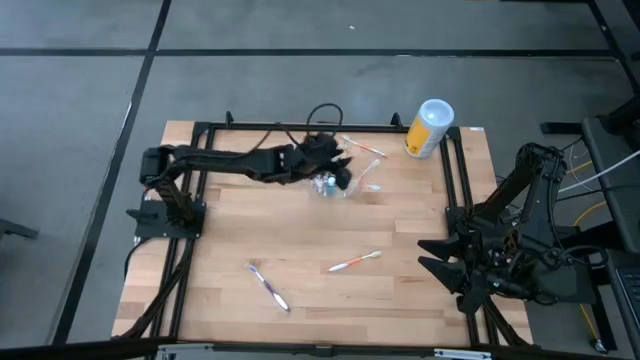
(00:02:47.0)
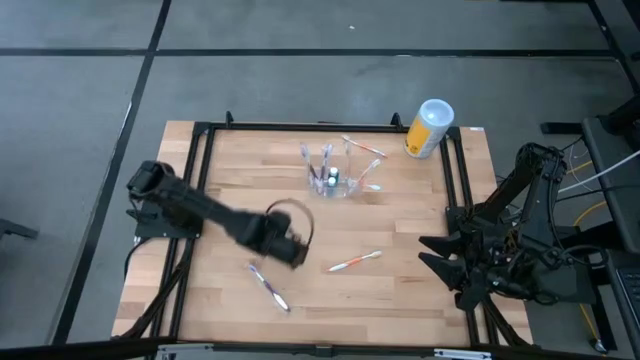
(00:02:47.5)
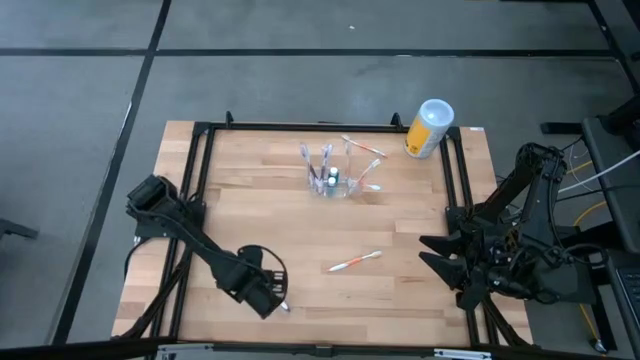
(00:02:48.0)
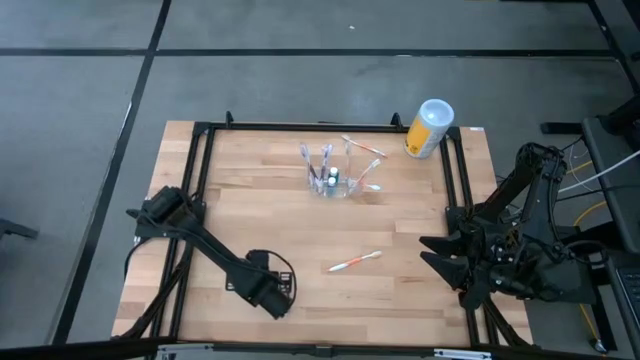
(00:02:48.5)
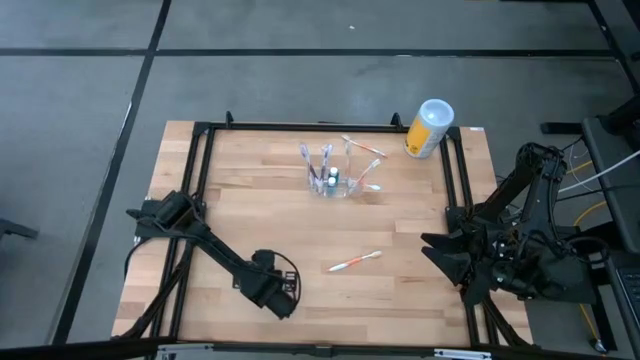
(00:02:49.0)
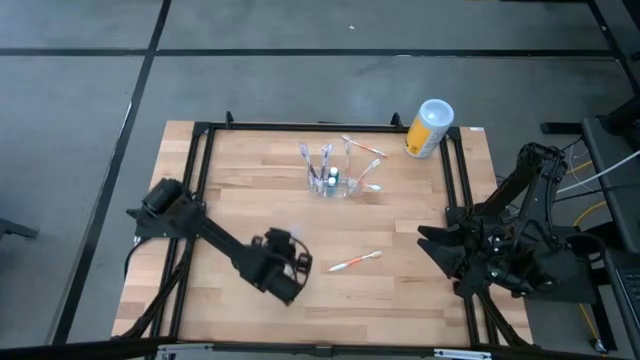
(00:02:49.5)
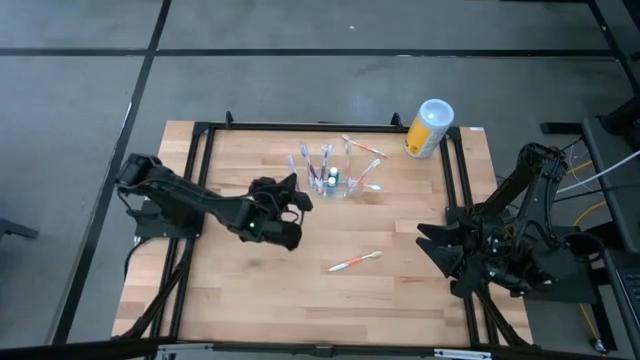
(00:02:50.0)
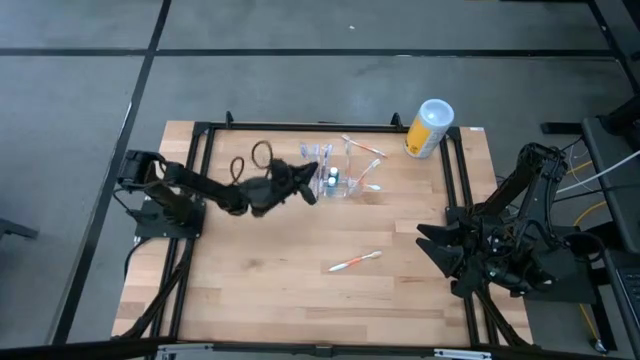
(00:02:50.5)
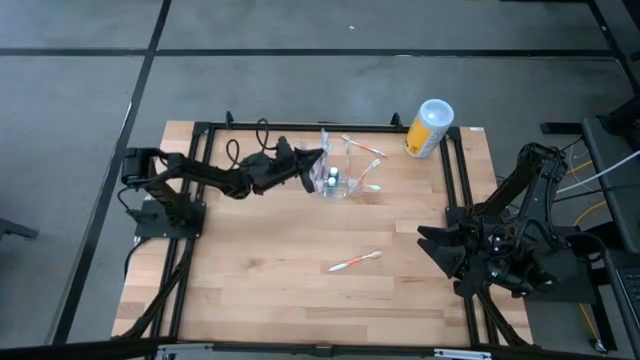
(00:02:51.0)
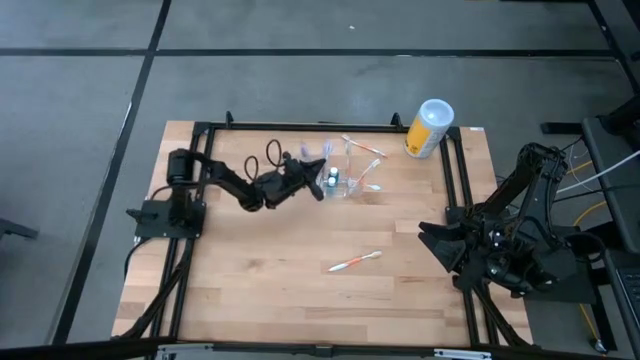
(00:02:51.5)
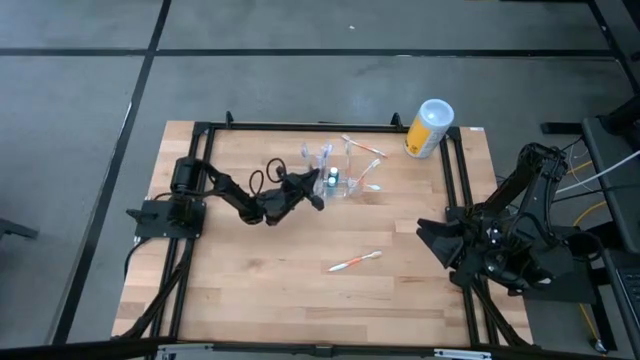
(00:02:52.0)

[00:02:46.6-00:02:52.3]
Task: Pick & Place toothbrushing station
Put the purple toothbrush into the left section of the transparent organizer

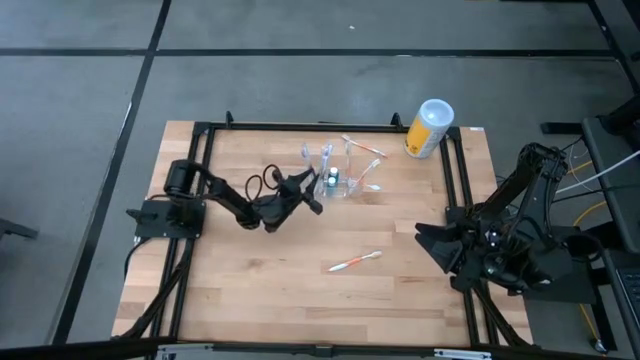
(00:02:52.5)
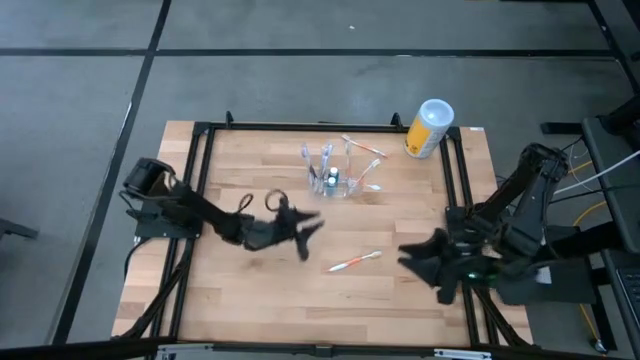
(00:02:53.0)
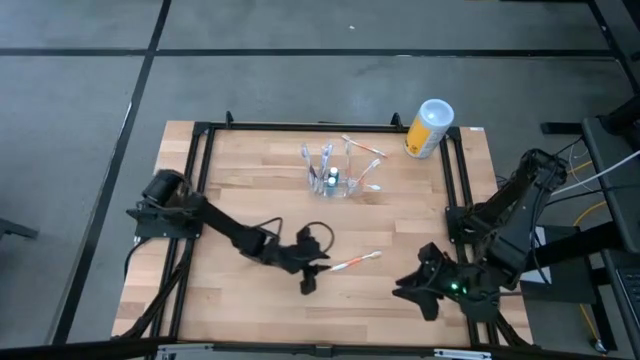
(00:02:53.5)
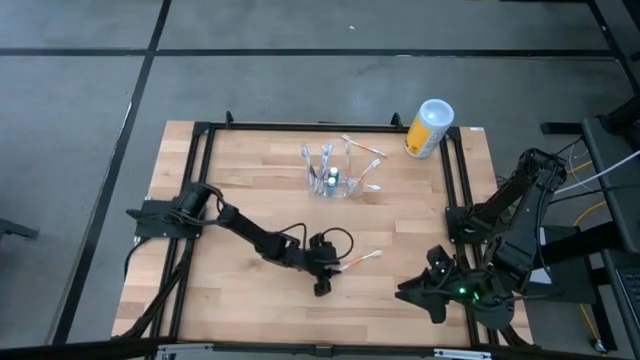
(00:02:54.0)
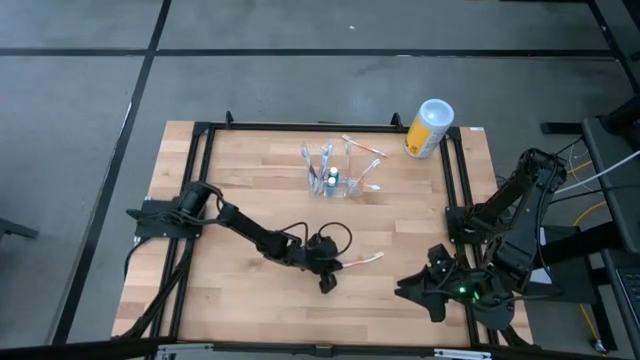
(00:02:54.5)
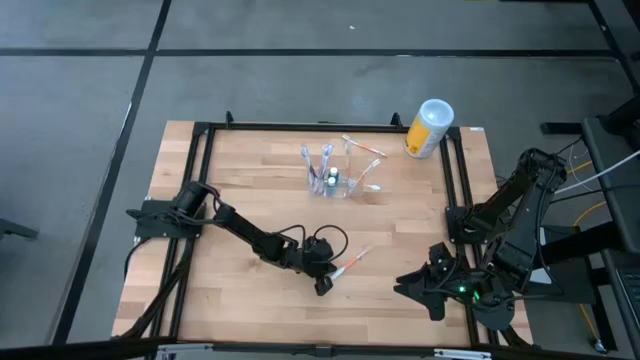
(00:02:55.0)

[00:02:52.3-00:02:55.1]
Put the orange toothbrush into the right section of the transparent organizer

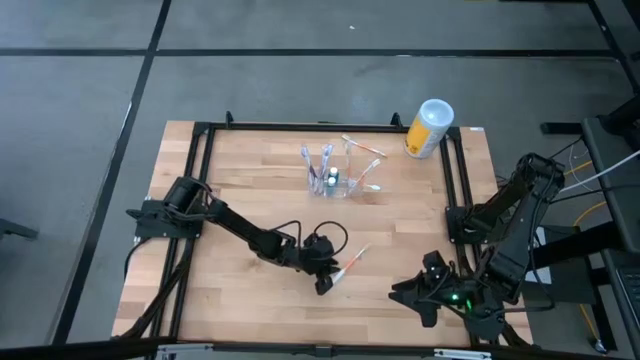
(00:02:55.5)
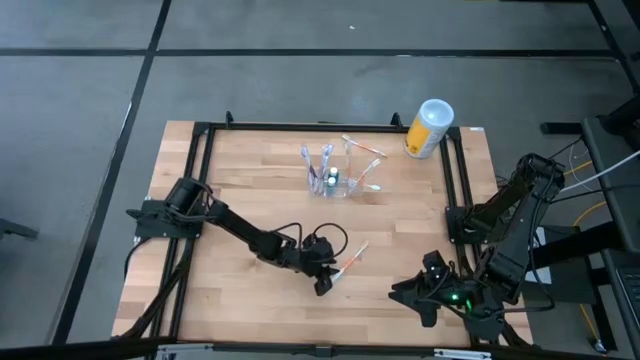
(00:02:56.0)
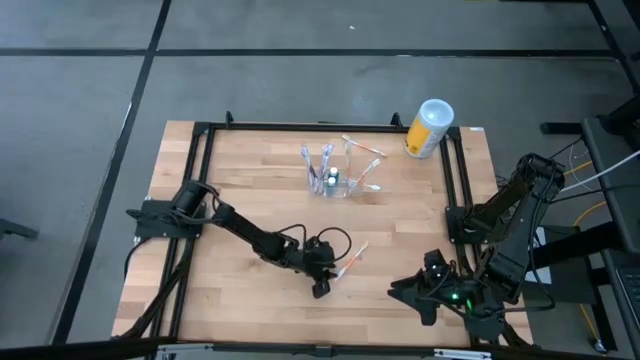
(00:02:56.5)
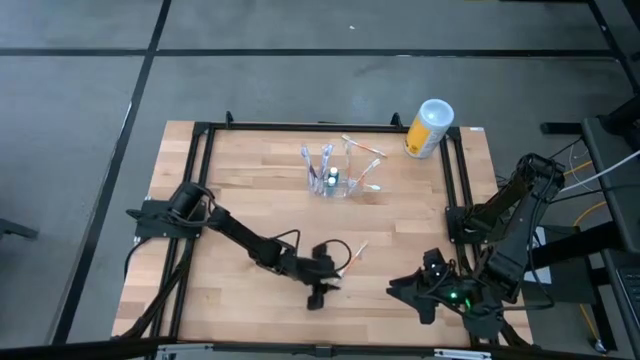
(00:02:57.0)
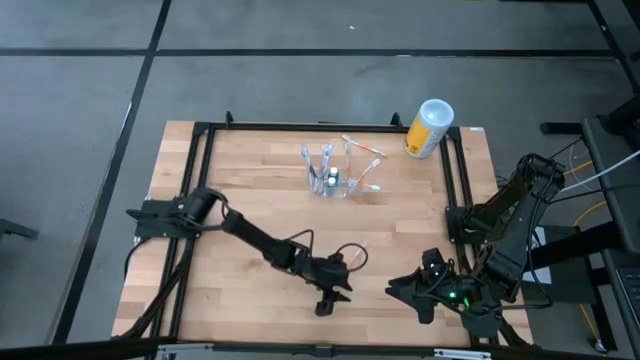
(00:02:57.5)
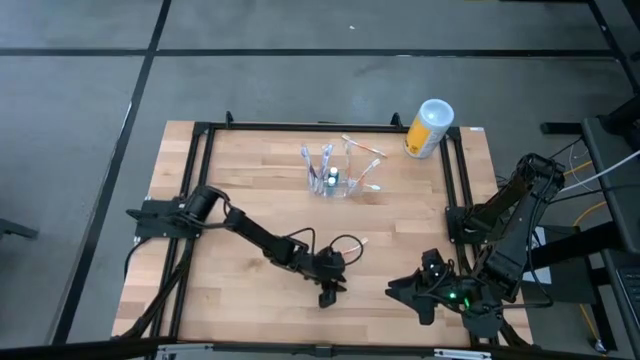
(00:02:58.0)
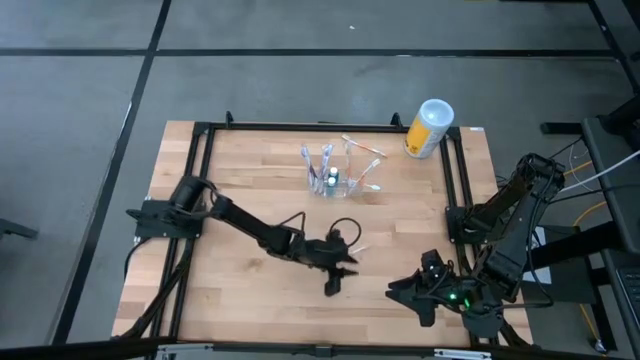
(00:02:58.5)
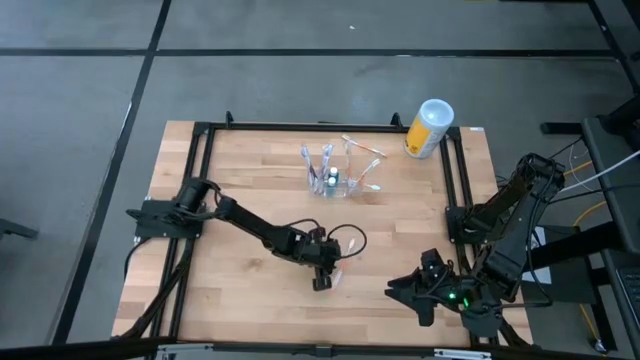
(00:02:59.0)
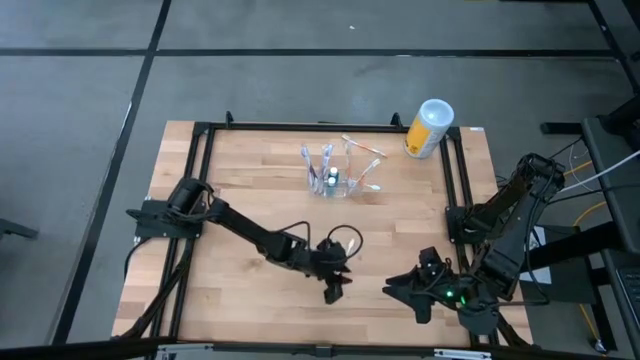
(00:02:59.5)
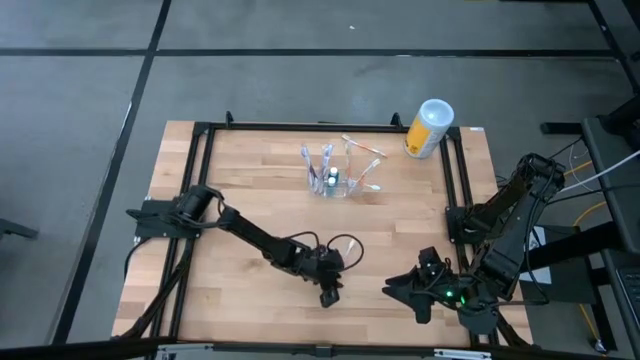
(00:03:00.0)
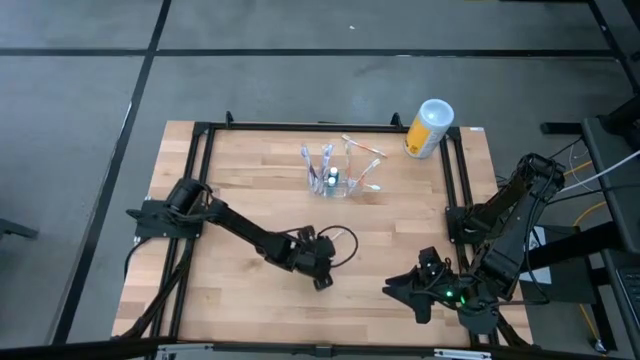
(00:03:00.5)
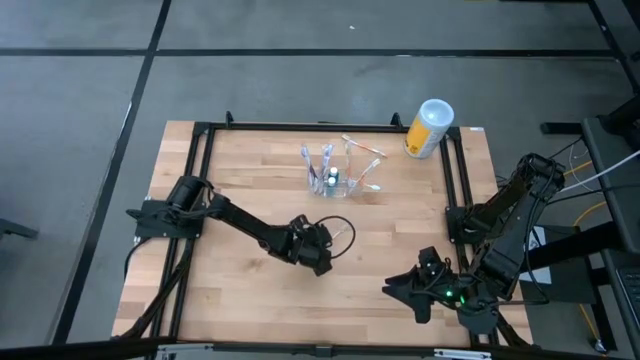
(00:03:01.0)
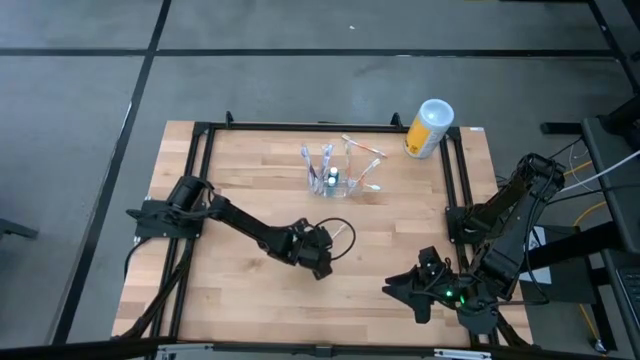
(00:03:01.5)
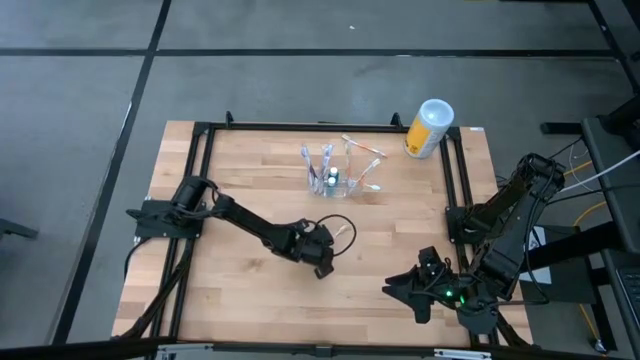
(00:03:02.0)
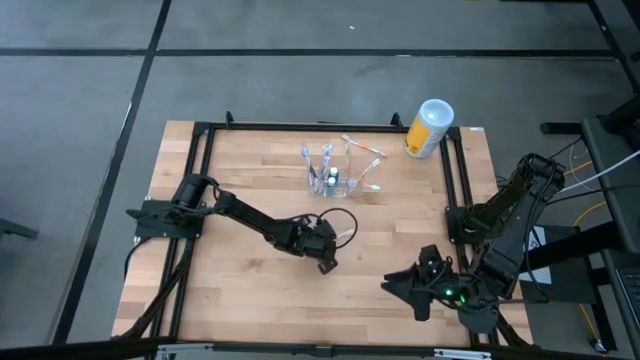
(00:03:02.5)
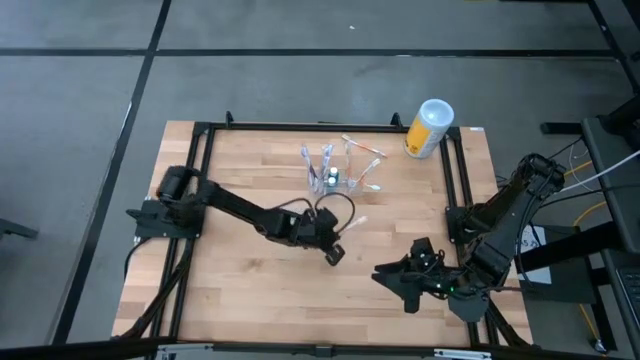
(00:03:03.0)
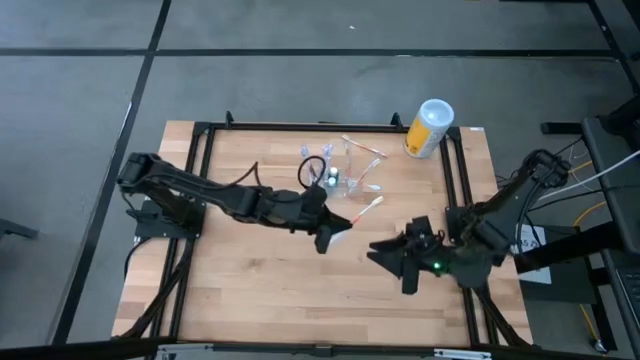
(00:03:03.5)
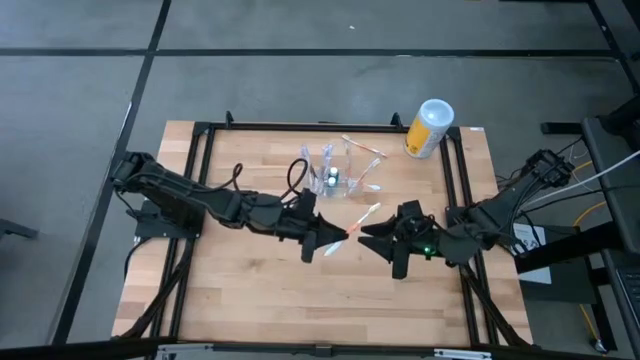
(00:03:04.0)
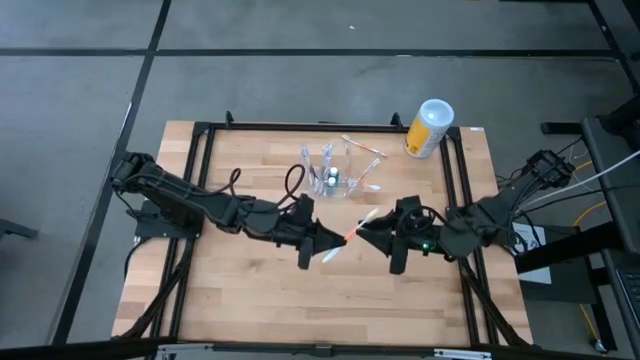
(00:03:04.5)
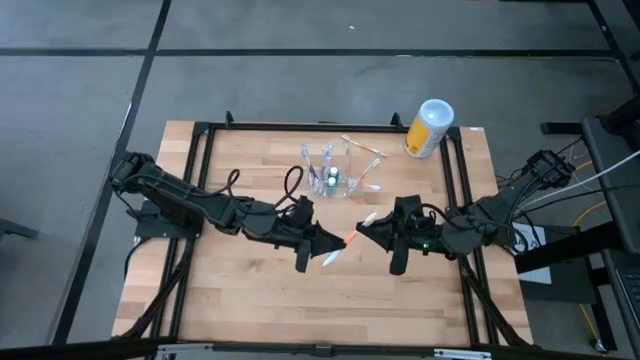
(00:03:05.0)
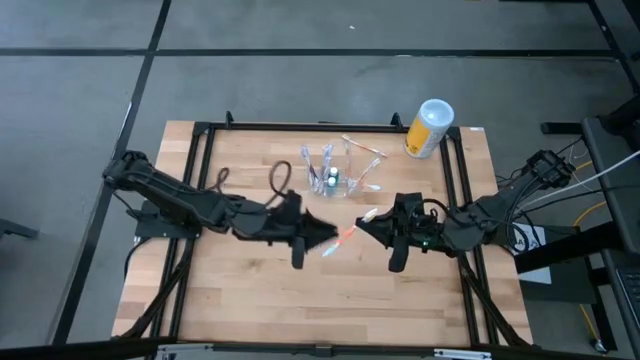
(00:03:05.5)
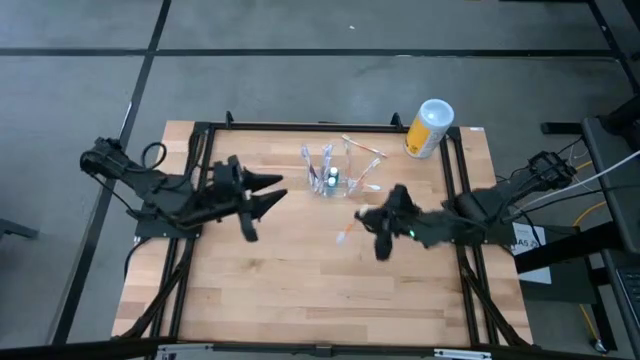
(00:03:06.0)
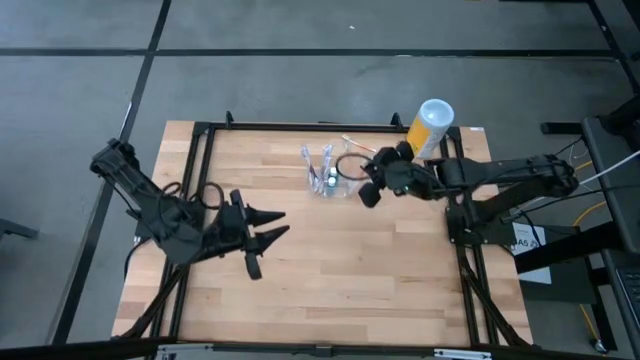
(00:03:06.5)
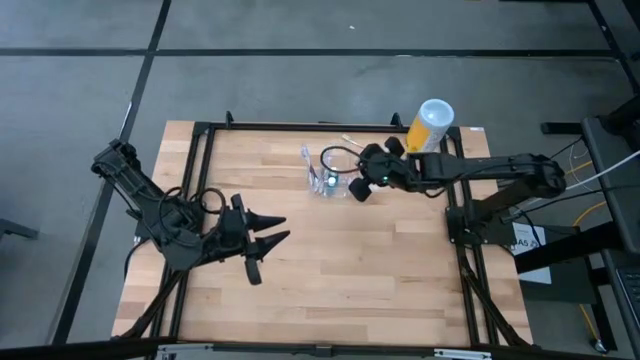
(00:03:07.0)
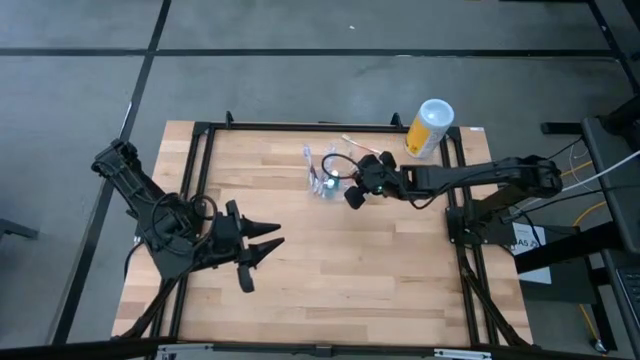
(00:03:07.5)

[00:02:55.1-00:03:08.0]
Put the orange toothbrush into the right section of the transparent organizer

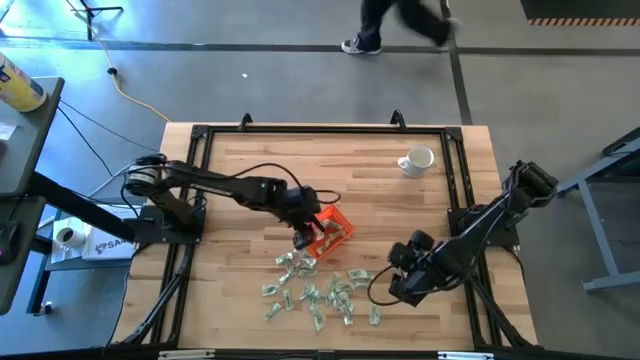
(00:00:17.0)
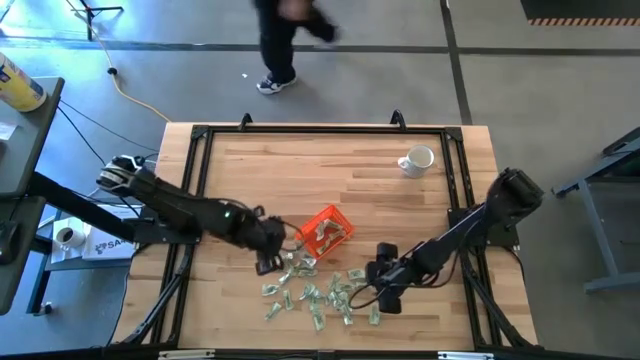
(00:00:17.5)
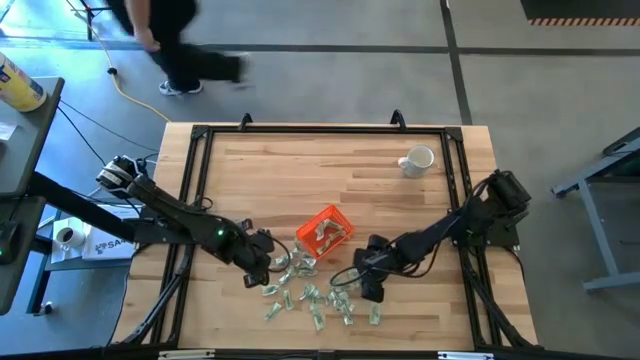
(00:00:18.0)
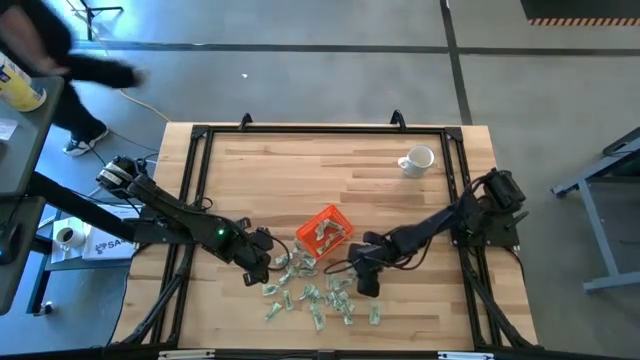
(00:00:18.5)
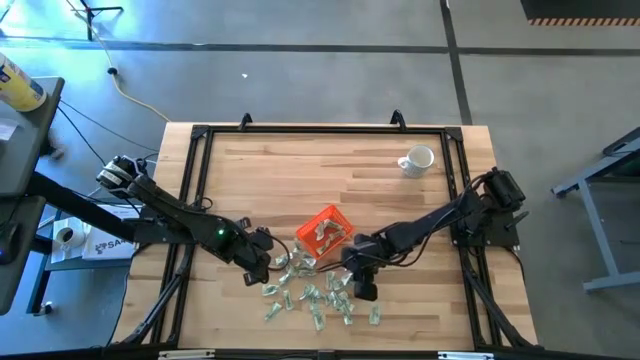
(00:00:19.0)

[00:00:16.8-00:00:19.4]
Task: Pick and place Stevia / Truvia into bins
Put the stevia packet into the orange bin
